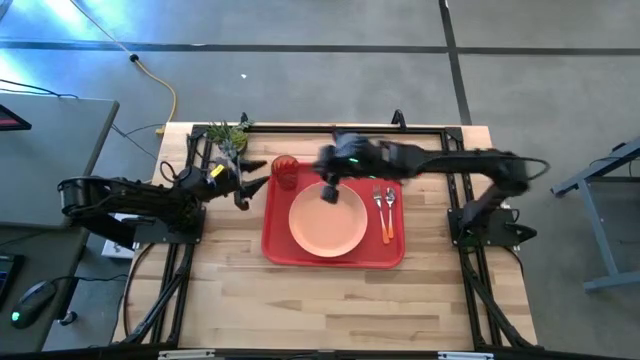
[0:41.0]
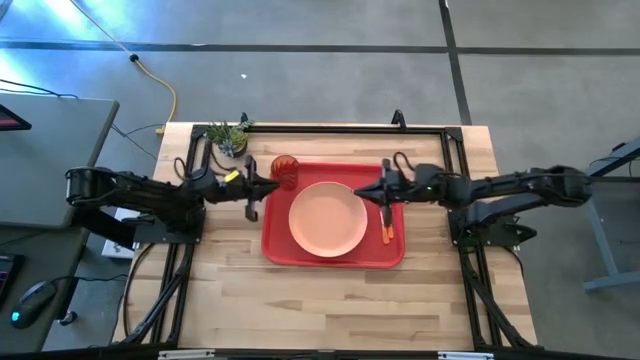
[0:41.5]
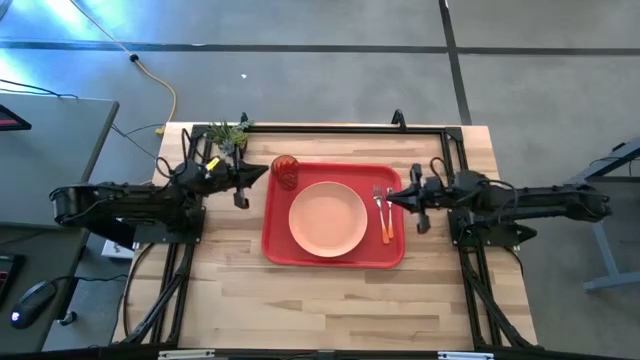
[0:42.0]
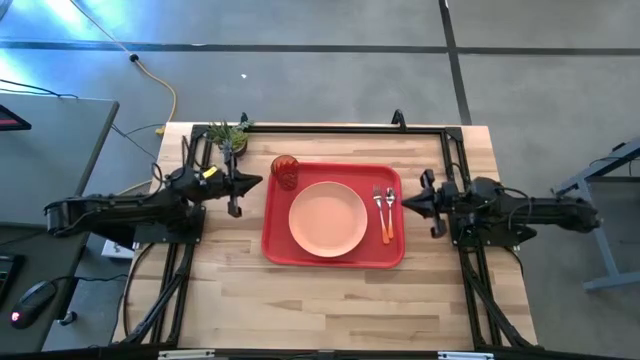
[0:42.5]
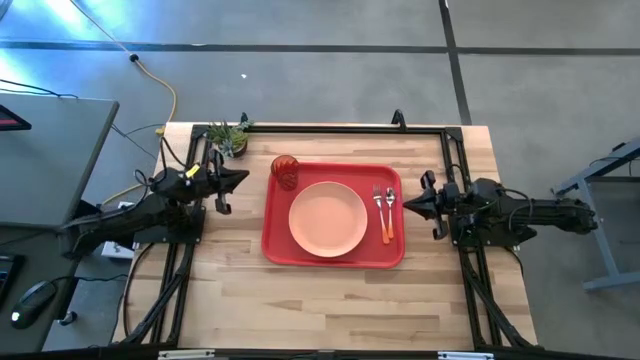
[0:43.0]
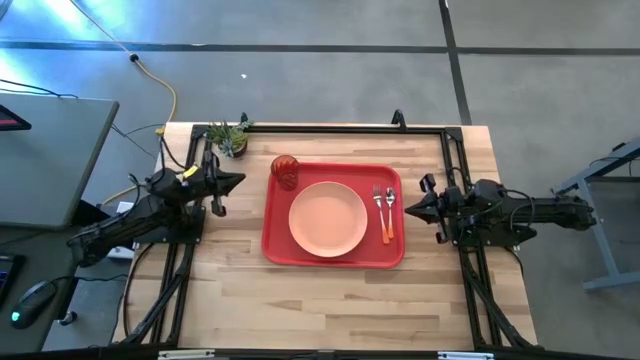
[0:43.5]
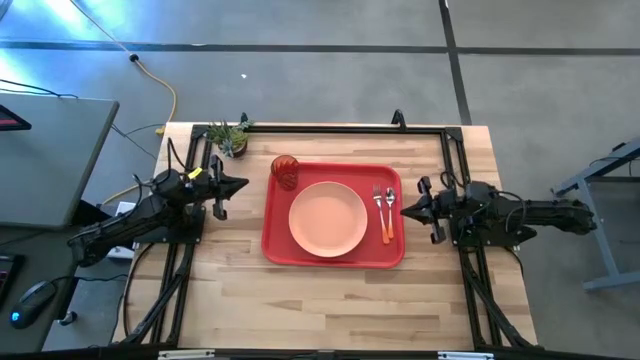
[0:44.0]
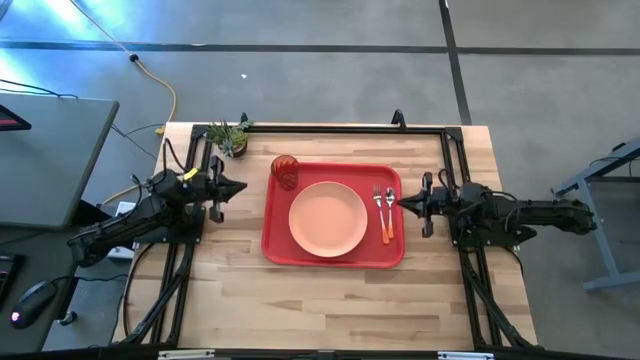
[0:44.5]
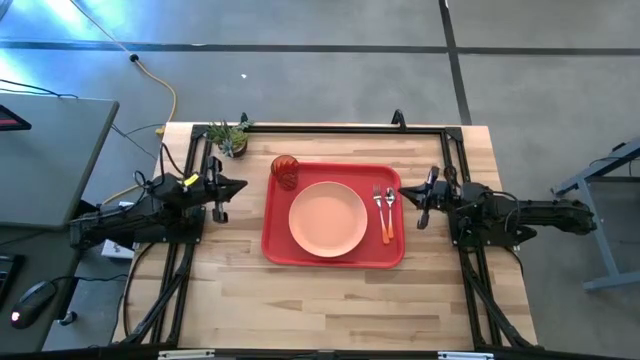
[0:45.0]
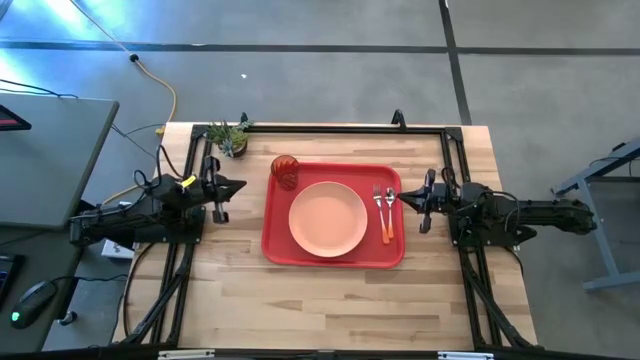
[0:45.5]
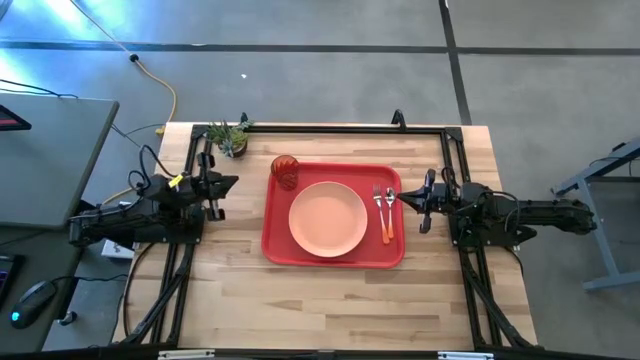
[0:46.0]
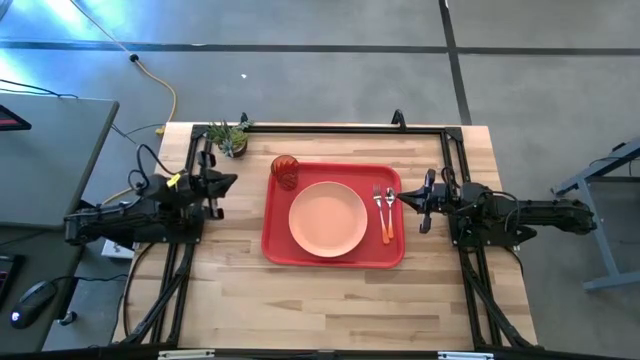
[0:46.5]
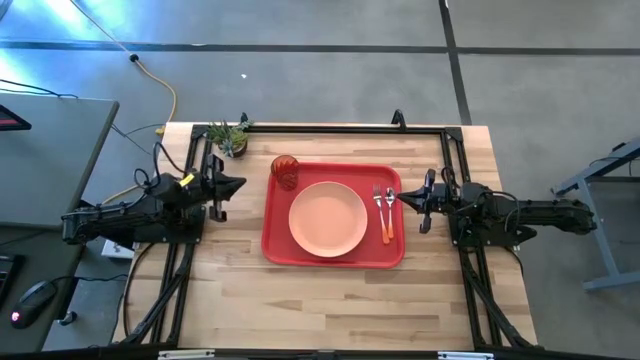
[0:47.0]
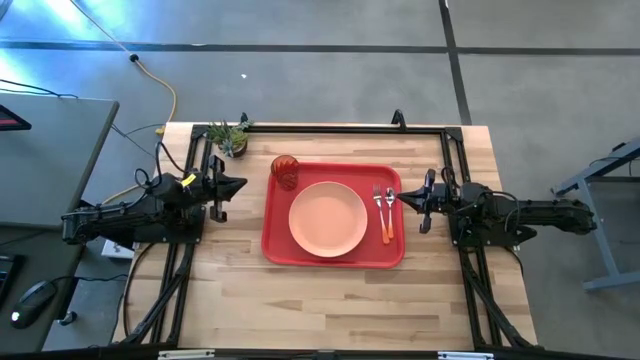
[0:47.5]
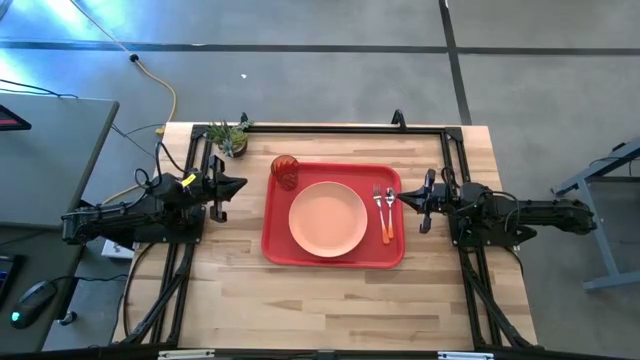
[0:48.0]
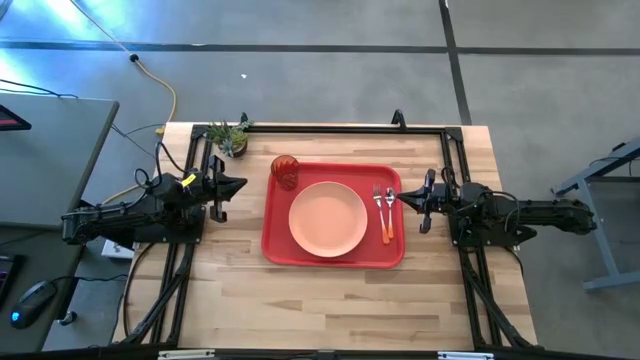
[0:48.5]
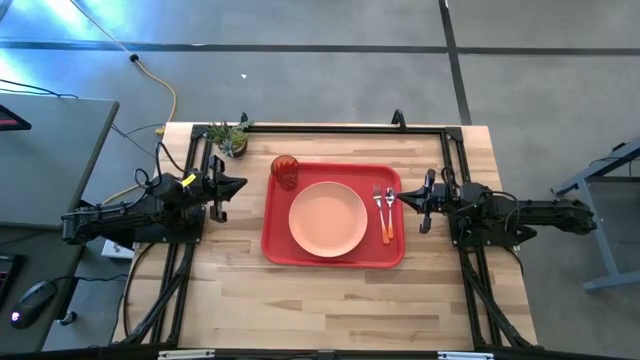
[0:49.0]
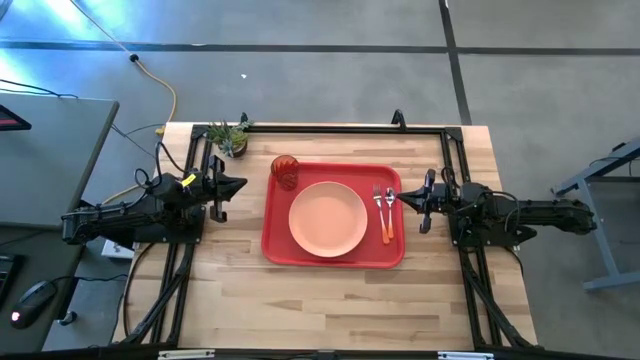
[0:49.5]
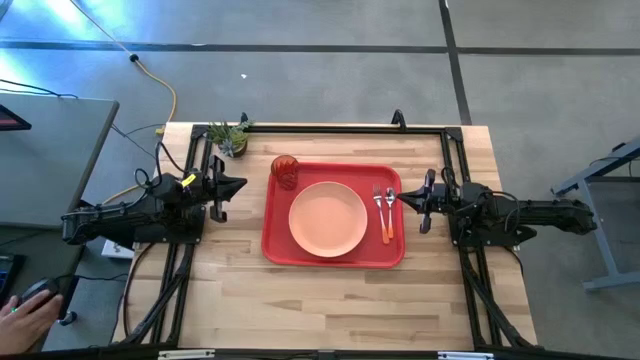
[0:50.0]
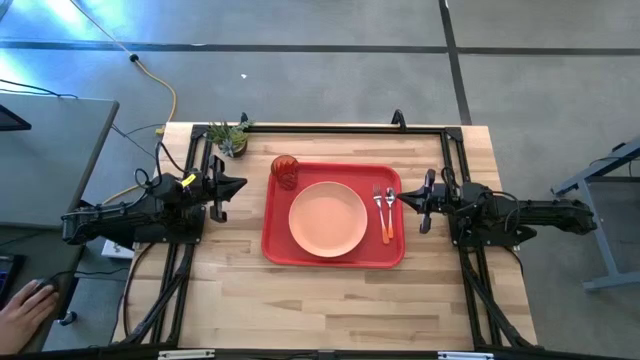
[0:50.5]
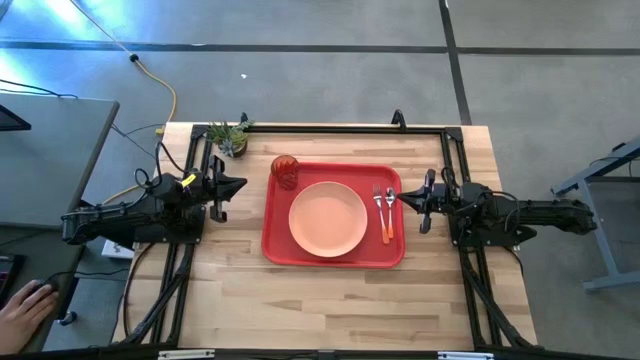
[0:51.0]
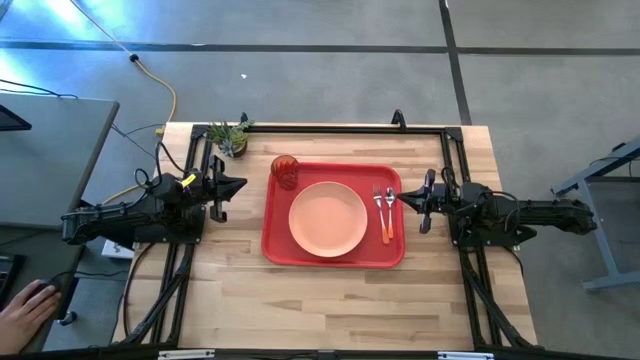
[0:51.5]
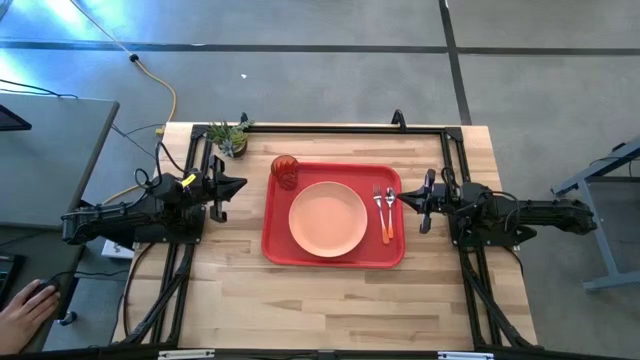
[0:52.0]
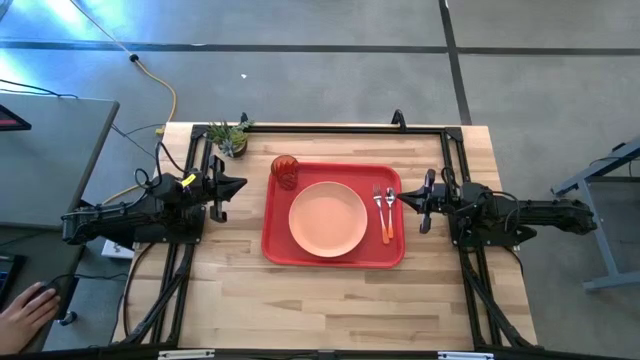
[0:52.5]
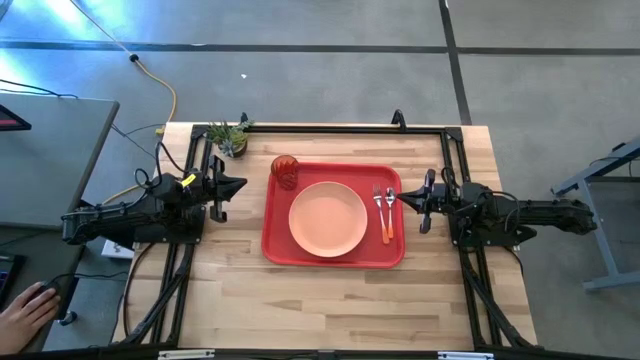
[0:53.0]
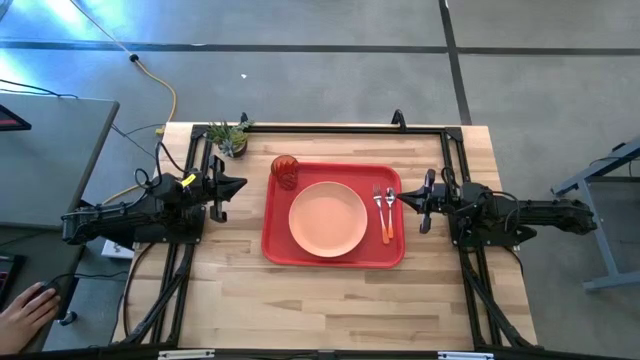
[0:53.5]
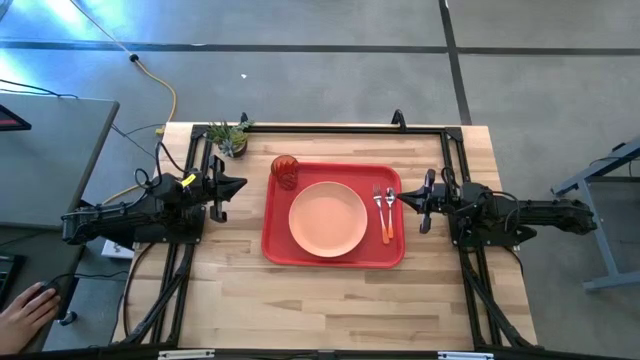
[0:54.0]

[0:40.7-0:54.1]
Task: Pick and place plate/cup/fork/spoon on tray
Return to Home Position

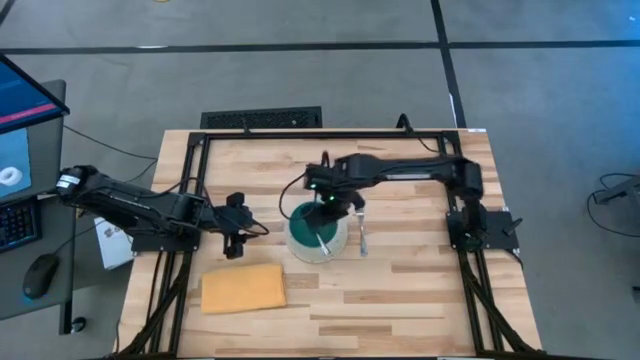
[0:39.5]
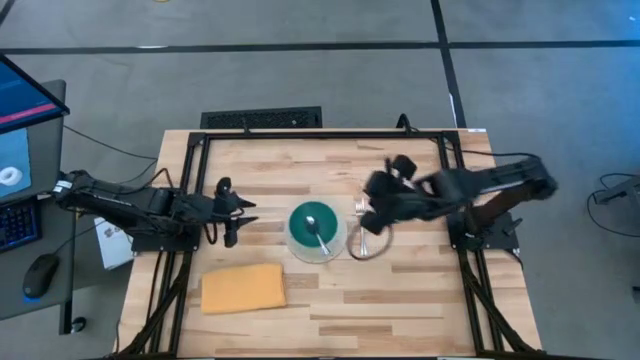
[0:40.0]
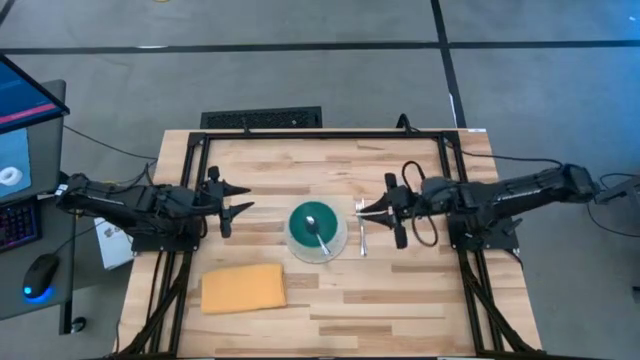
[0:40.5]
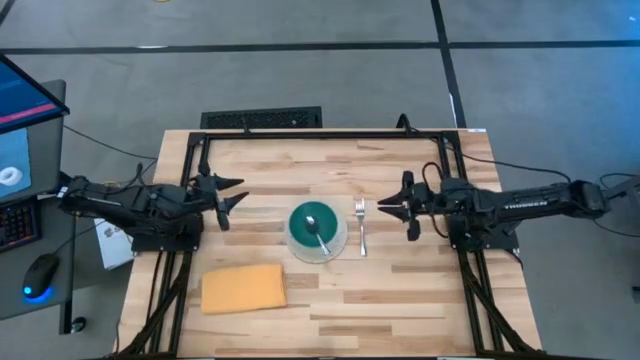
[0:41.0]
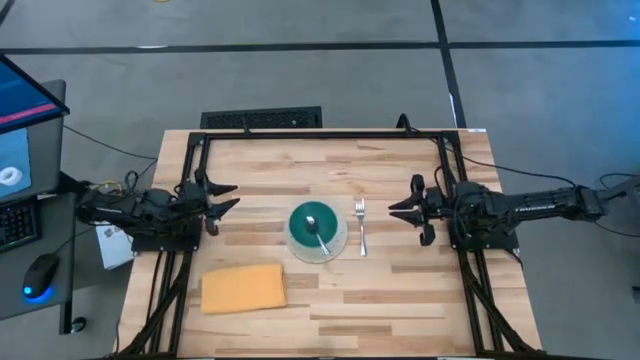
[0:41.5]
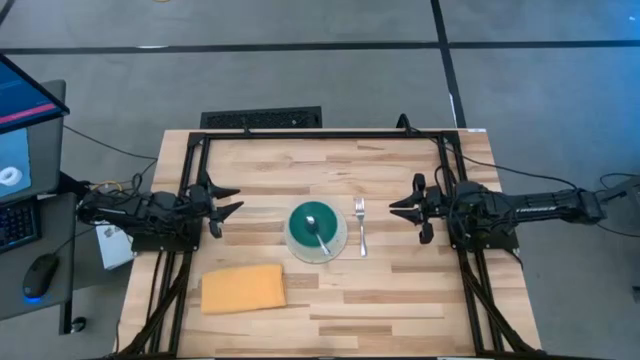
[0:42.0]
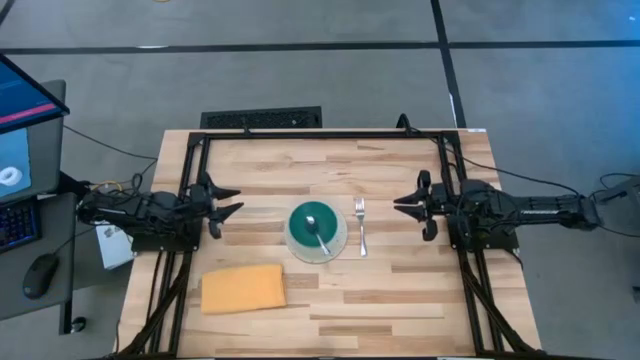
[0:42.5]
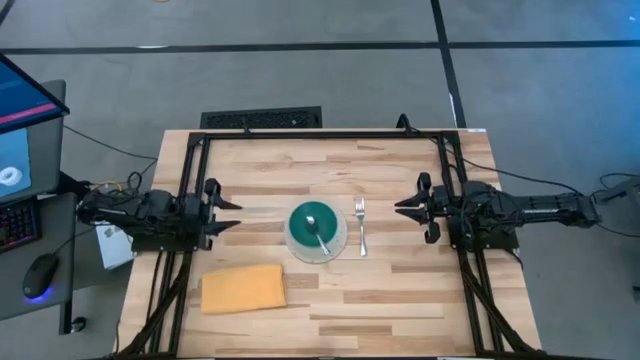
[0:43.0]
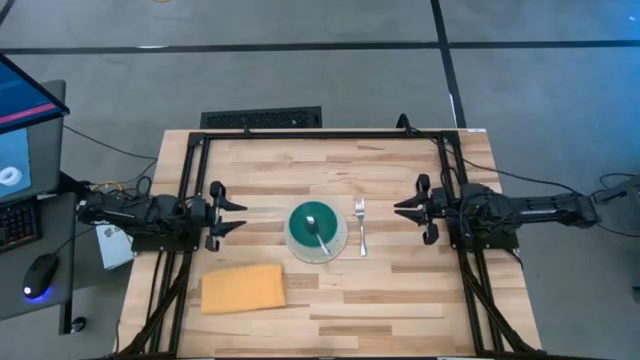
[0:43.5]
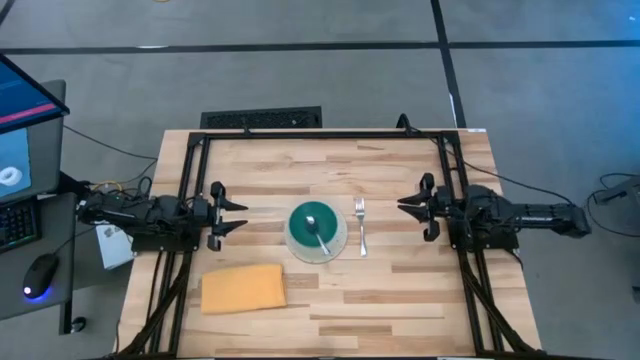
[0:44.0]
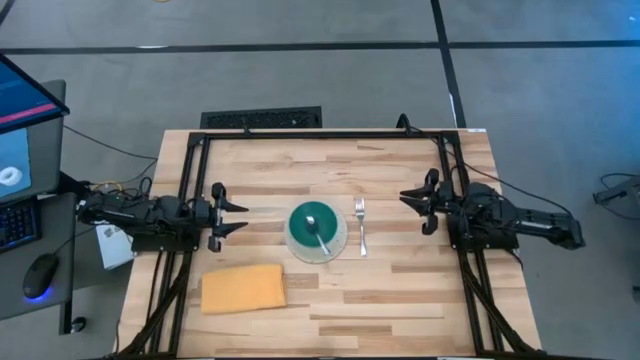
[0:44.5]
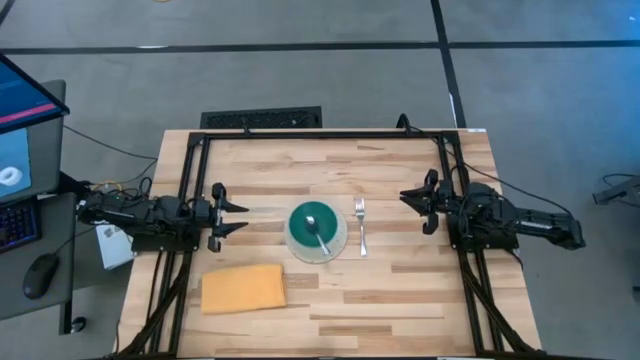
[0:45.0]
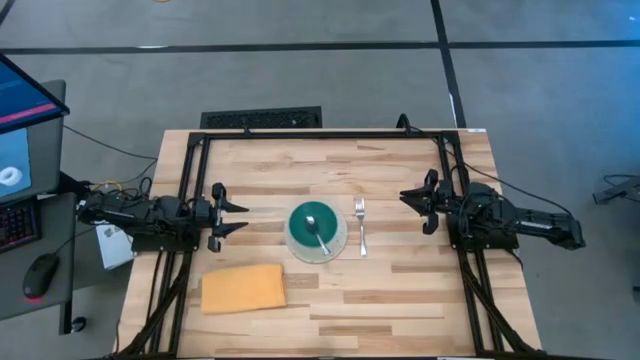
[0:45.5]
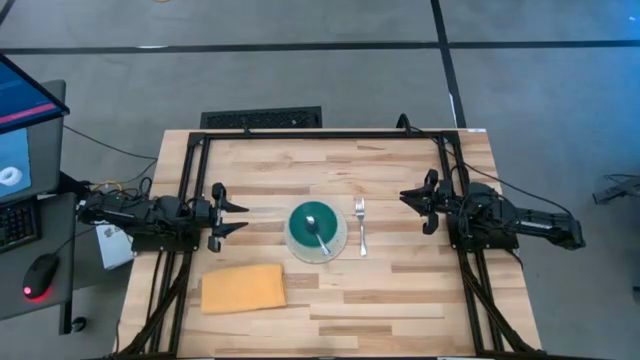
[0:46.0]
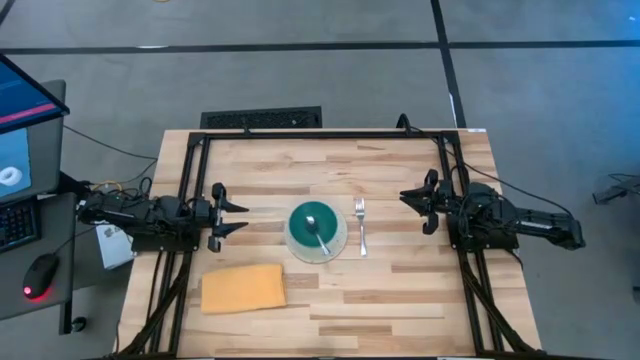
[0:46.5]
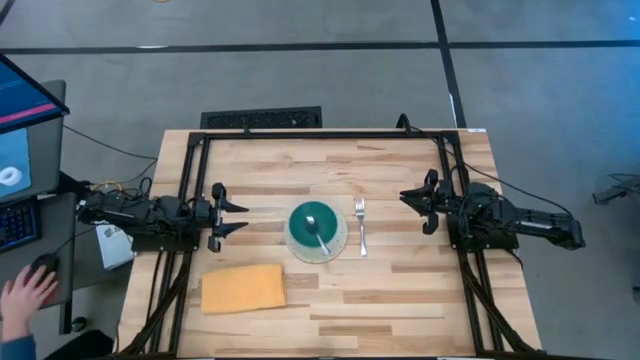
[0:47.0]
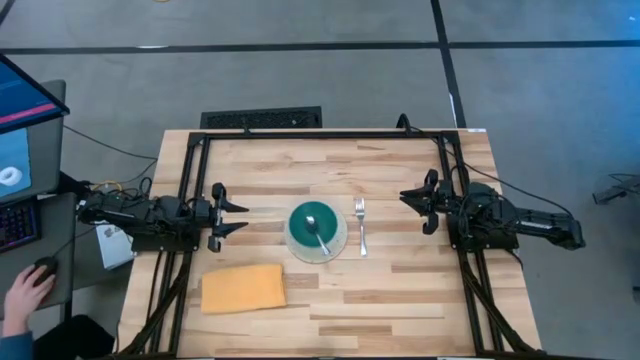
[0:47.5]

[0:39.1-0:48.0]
Task: Set table place
Return to Home Position
